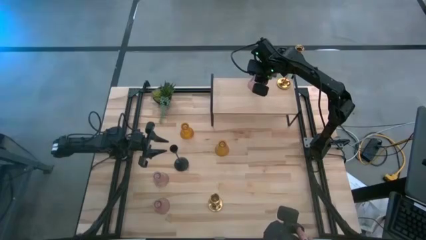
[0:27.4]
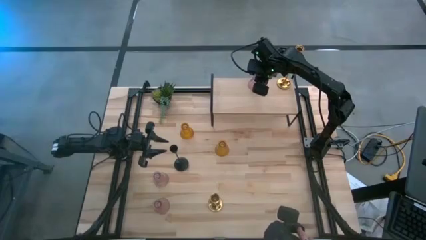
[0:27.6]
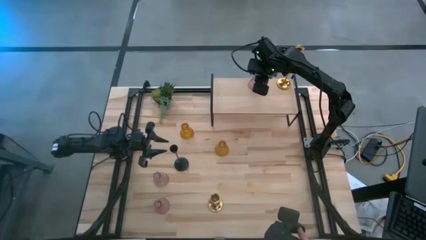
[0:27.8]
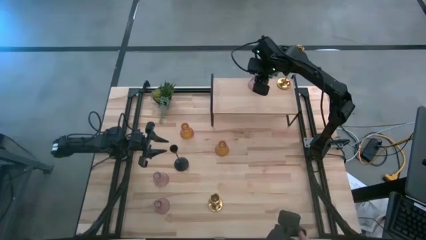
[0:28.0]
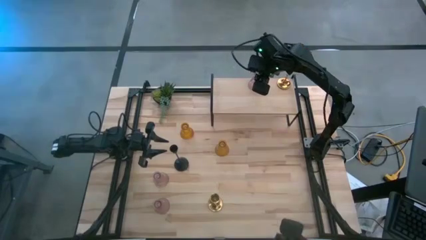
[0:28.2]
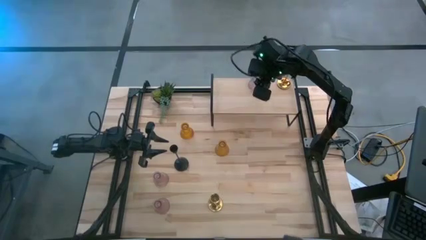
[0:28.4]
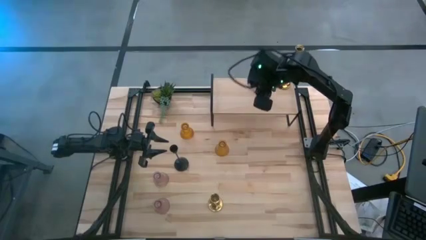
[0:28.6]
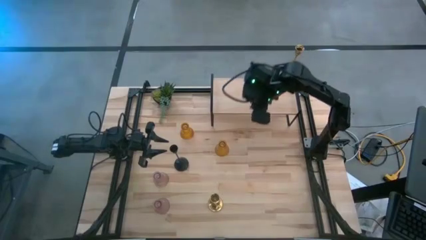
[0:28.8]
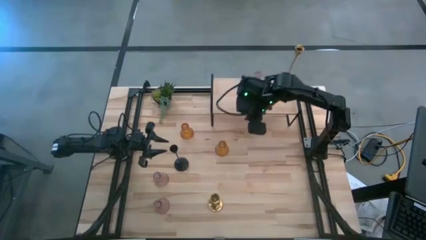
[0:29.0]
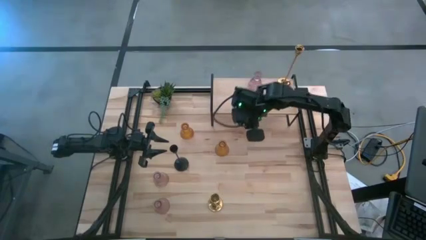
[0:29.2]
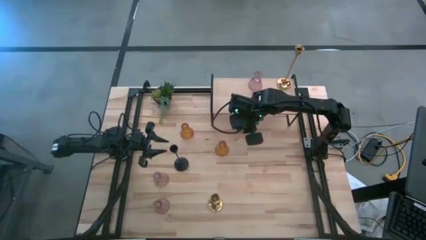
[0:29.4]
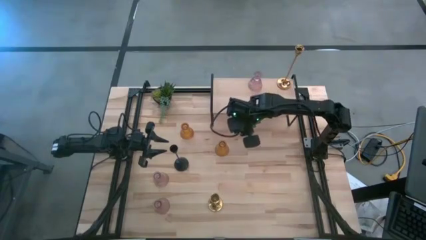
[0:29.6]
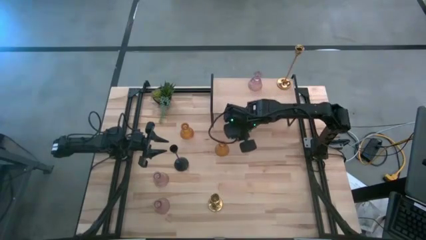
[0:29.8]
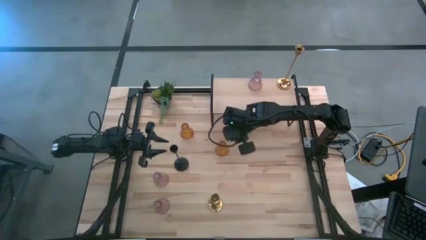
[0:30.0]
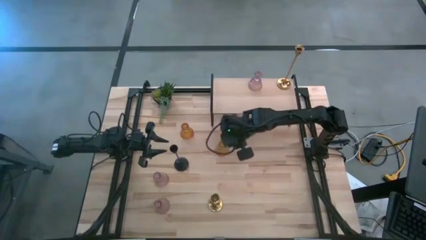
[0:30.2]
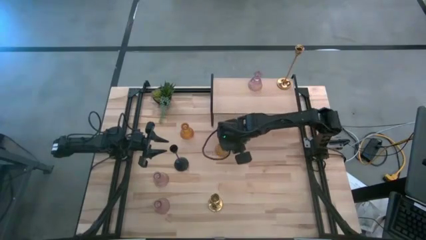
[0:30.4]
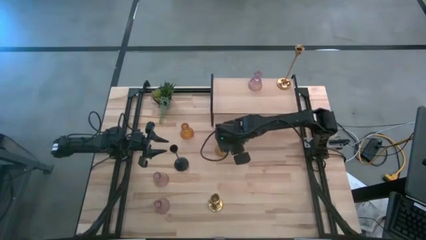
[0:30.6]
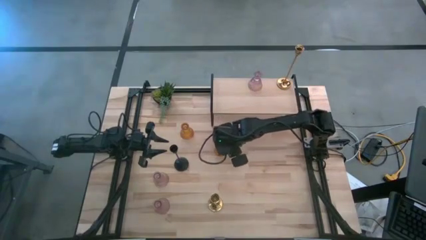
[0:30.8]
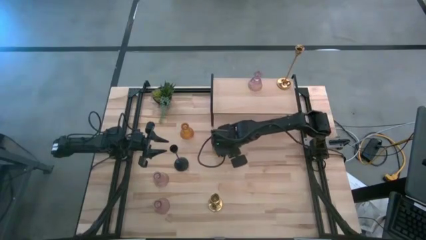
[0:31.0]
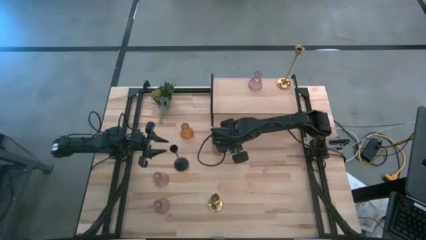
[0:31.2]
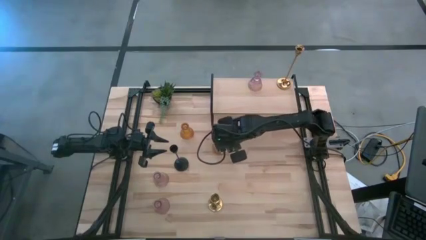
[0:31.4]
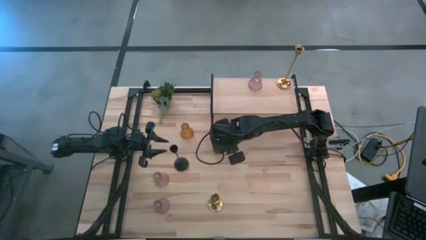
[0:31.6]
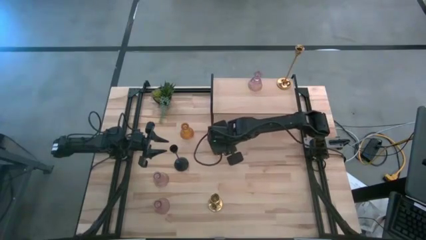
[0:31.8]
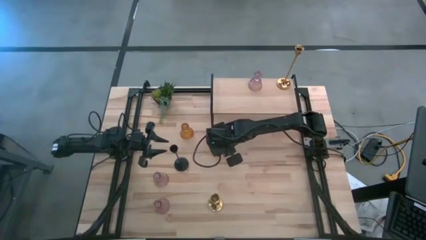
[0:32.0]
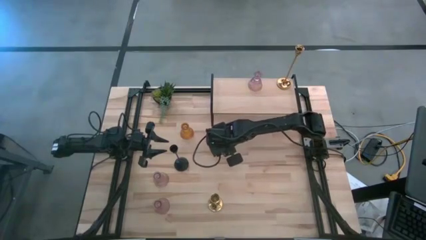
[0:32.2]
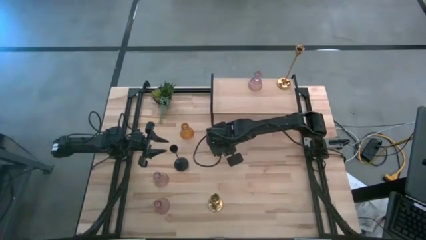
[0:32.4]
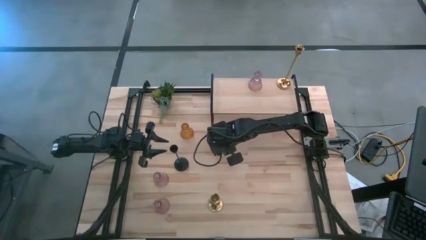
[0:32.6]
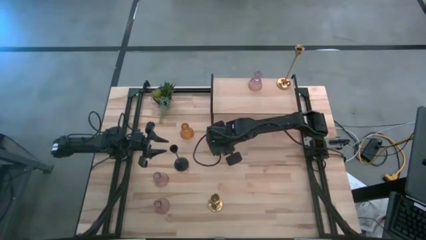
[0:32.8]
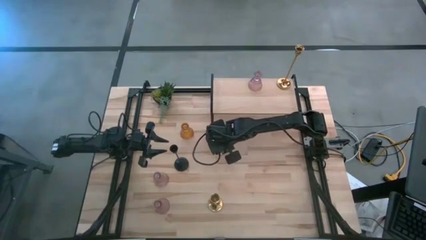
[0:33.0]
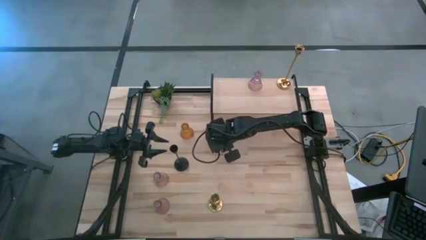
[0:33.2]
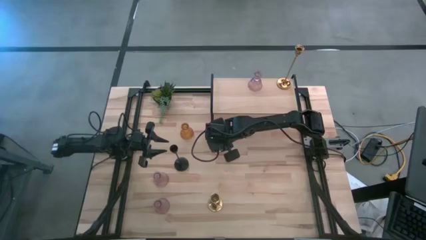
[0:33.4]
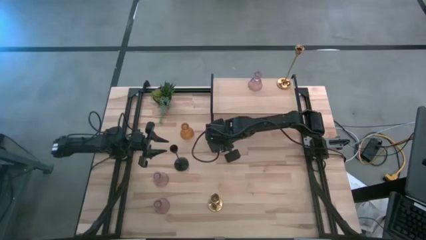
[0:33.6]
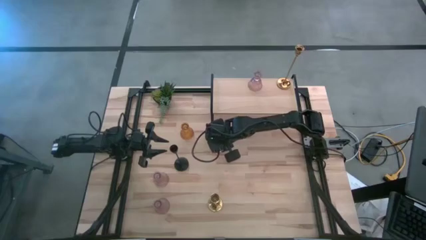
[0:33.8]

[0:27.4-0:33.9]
Task: Pick & Place candle stick holders
Put the right orange candle holder on the shelf

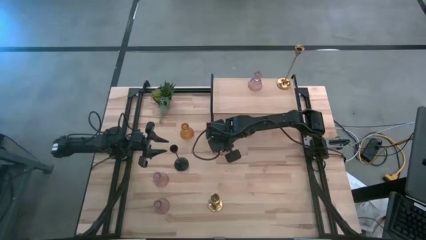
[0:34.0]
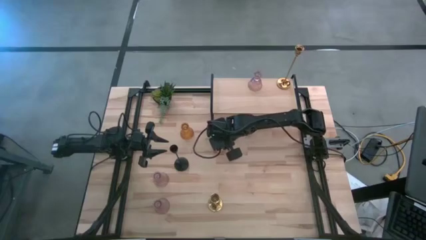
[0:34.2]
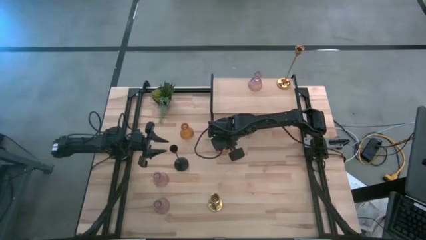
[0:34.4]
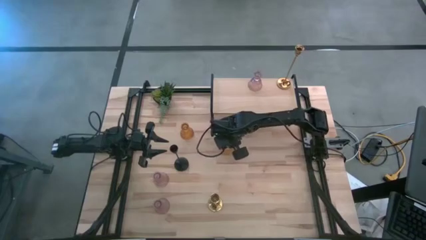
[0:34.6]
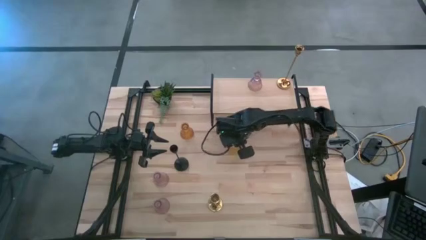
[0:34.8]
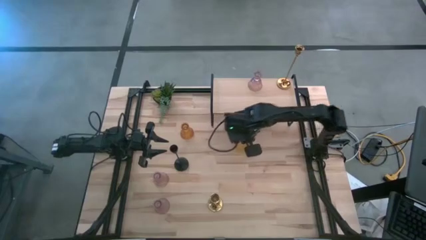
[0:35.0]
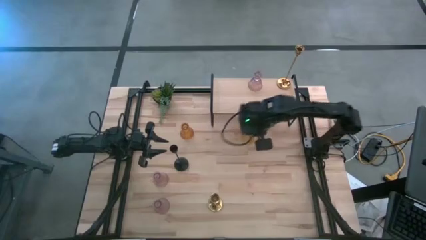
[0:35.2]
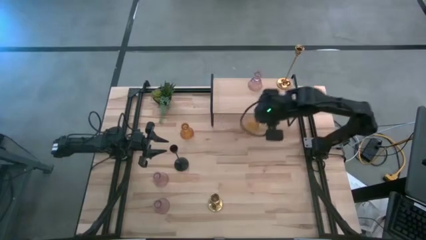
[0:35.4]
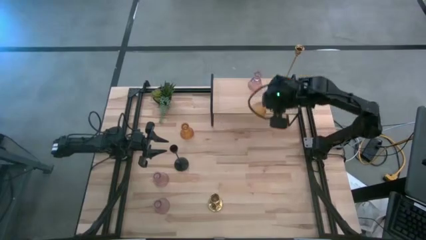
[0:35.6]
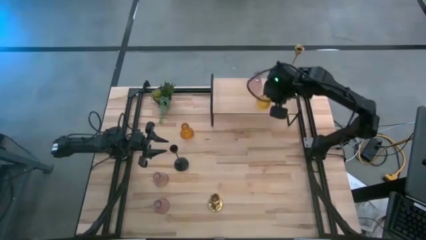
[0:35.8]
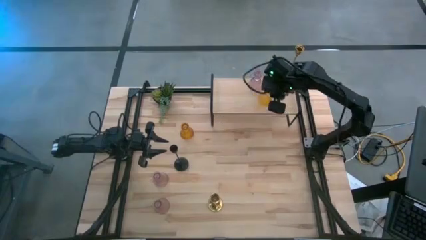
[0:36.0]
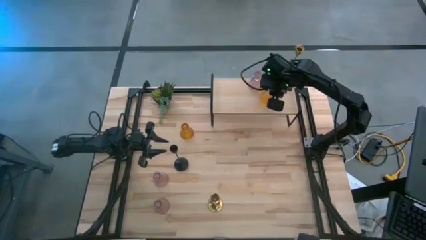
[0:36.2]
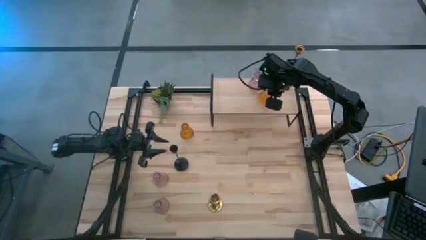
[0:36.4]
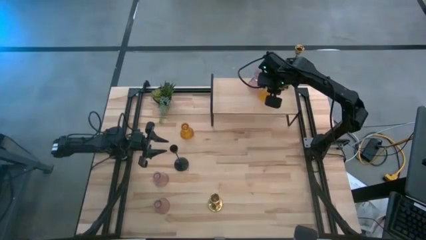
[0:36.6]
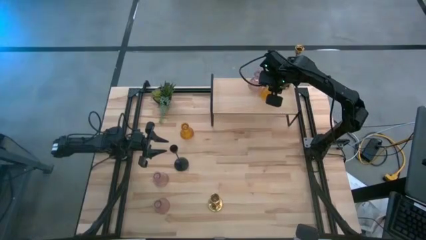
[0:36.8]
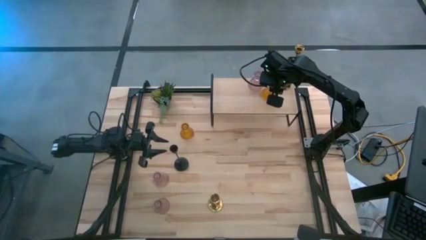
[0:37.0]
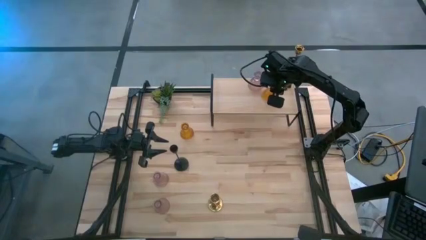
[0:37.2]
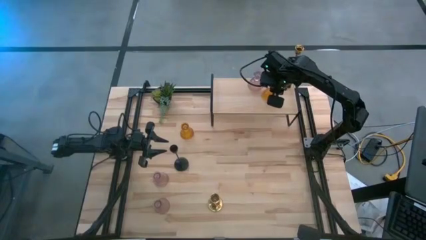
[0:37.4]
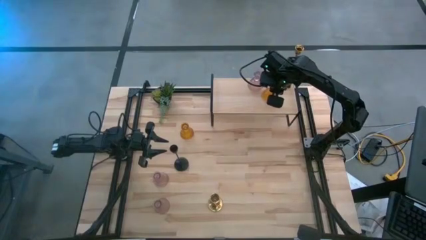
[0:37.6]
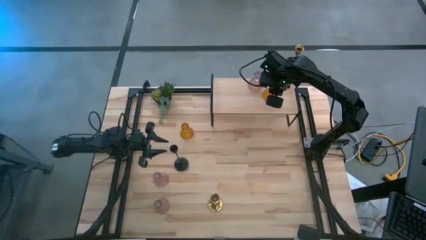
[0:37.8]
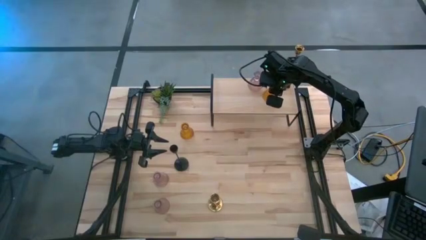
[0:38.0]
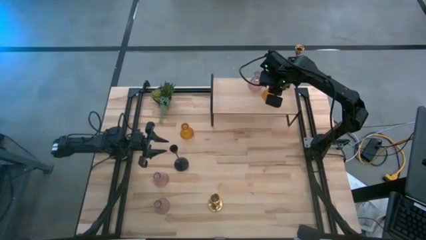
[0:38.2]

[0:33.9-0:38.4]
Put the right orange candle holder on the shelf
